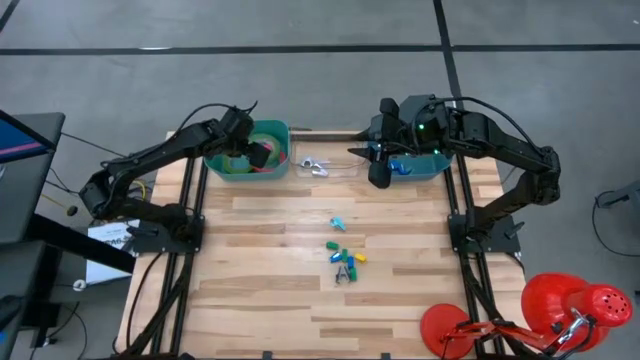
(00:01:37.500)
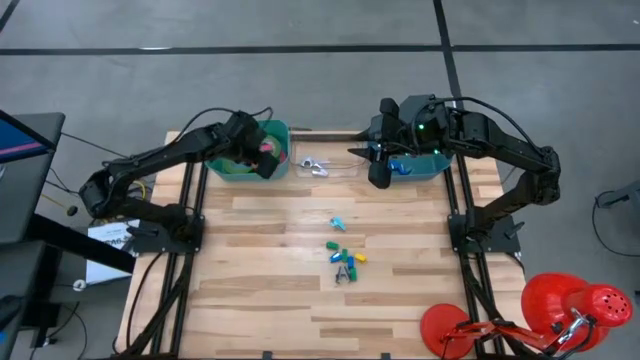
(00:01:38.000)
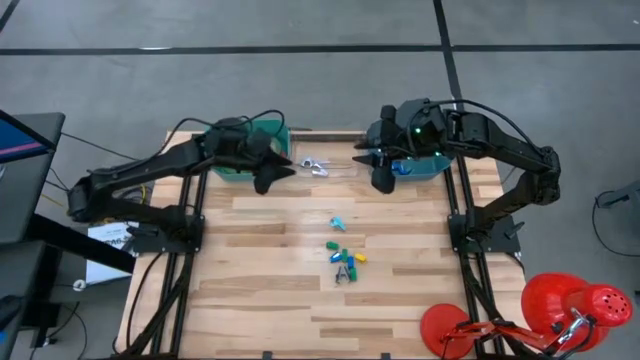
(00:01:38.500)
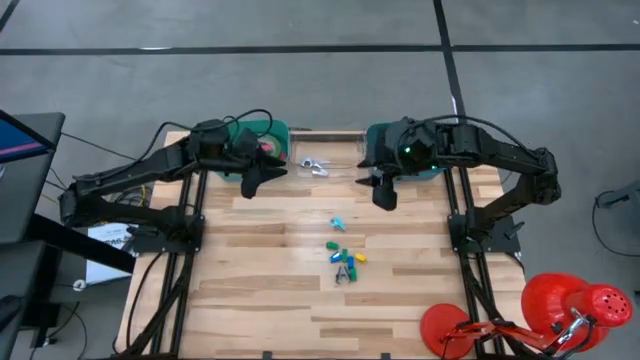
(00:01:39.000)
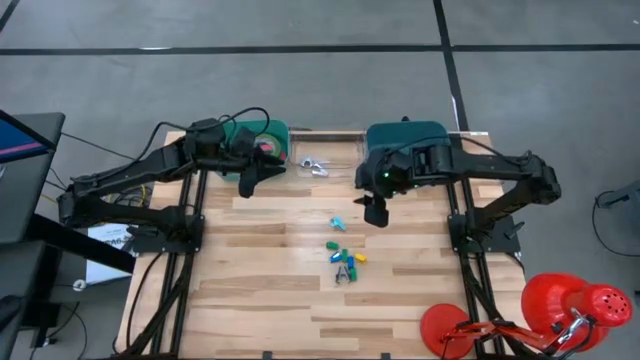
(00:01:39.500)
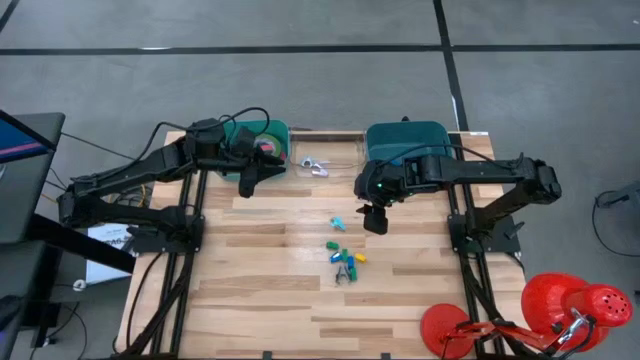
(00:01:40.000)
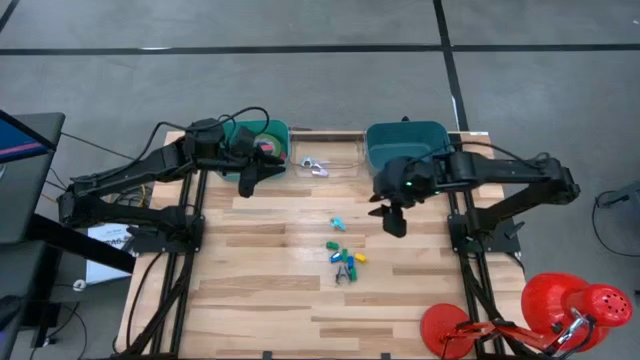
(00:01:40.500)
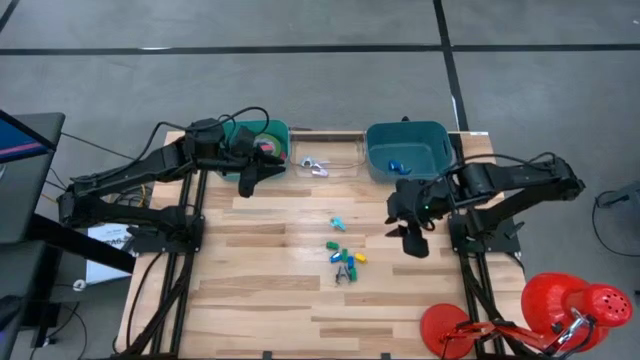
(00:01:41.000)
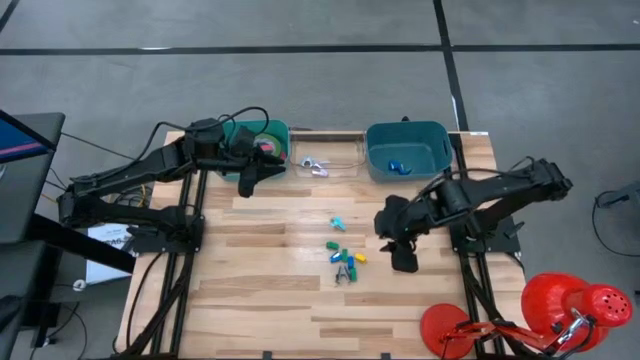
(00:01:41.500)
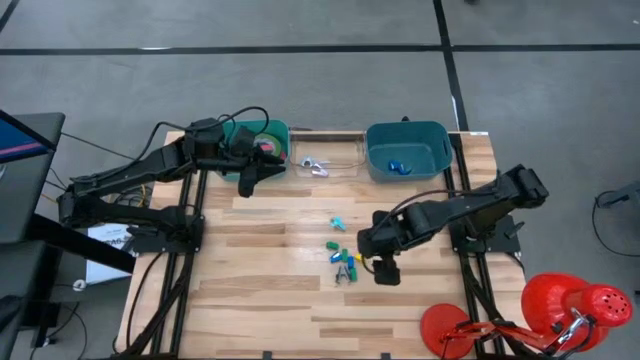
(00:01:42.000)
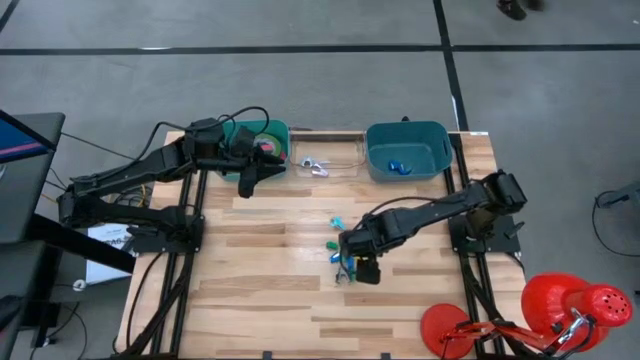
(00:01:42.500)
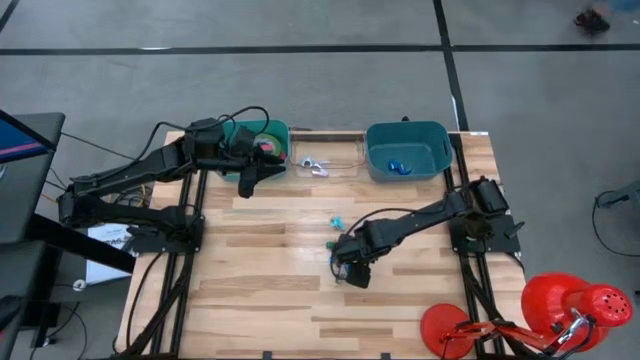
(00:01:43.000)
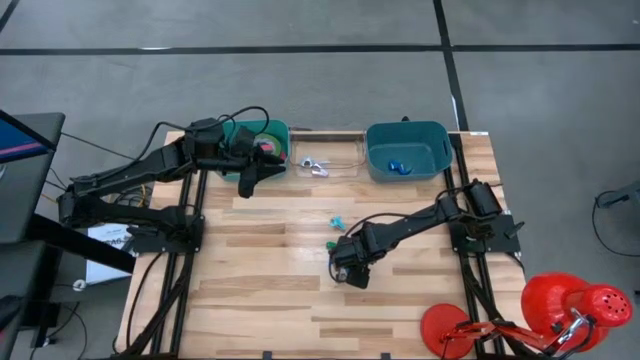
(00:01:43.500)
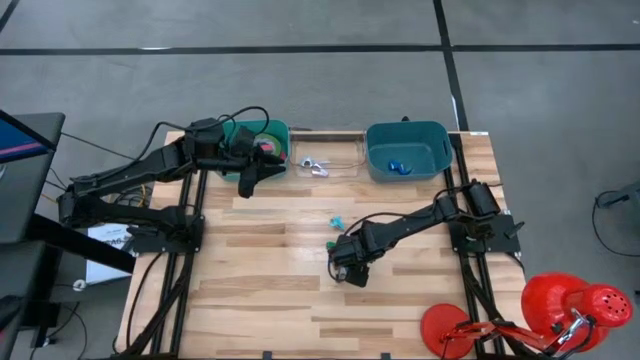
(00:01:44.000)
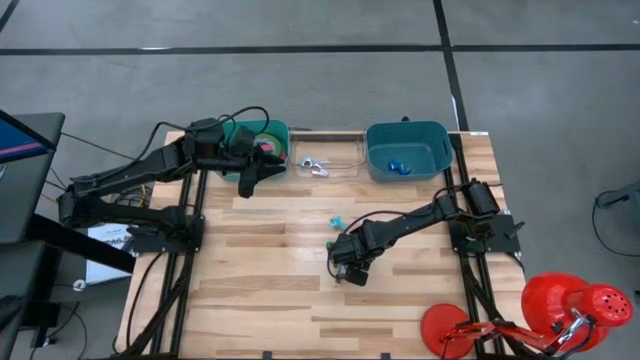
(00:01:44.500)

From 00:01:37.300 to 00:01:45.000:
Task: Pick and place Stapler, Stapler remover, tape
Put the yellow stapler into the dark blue bin

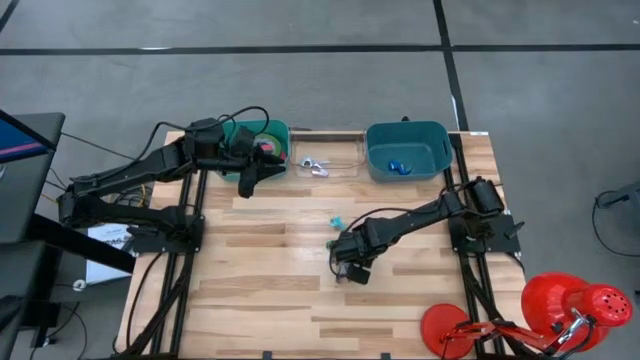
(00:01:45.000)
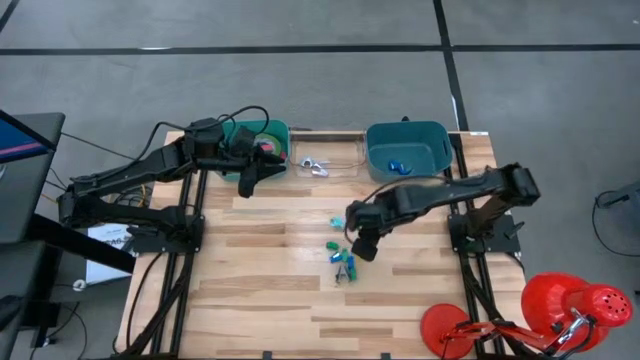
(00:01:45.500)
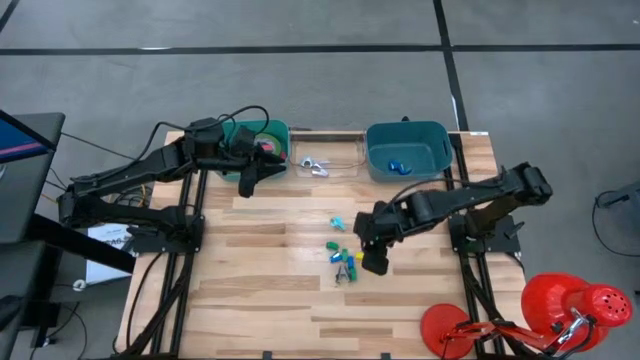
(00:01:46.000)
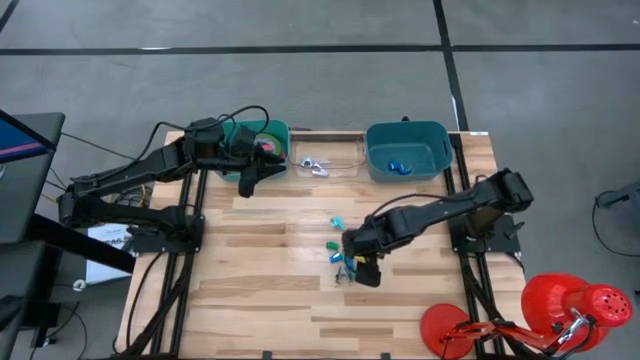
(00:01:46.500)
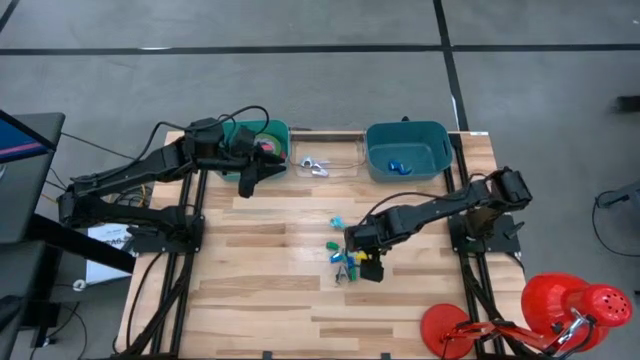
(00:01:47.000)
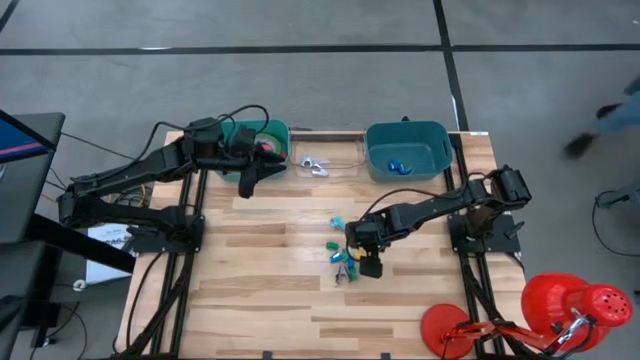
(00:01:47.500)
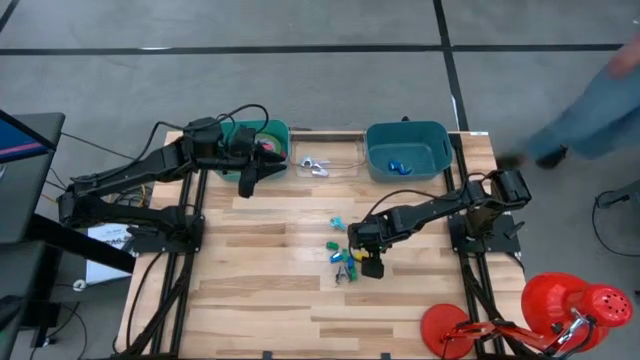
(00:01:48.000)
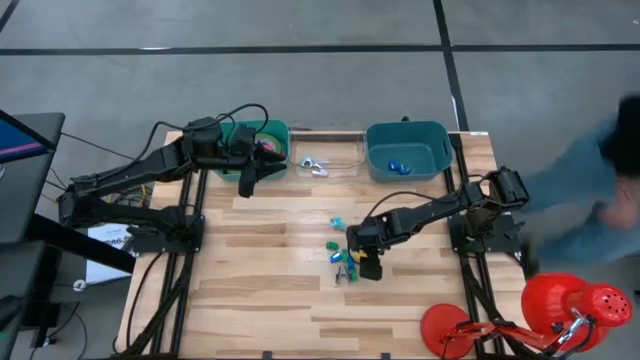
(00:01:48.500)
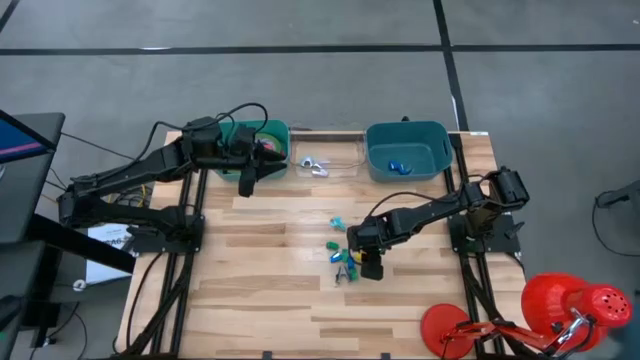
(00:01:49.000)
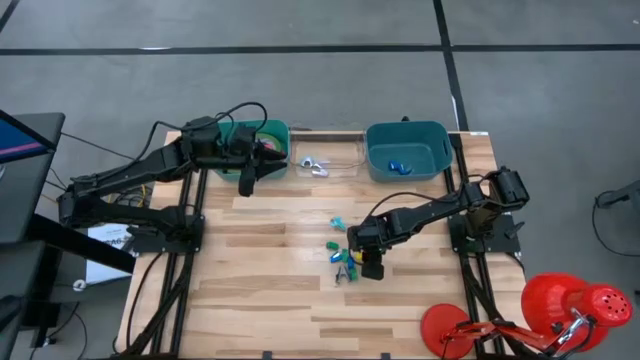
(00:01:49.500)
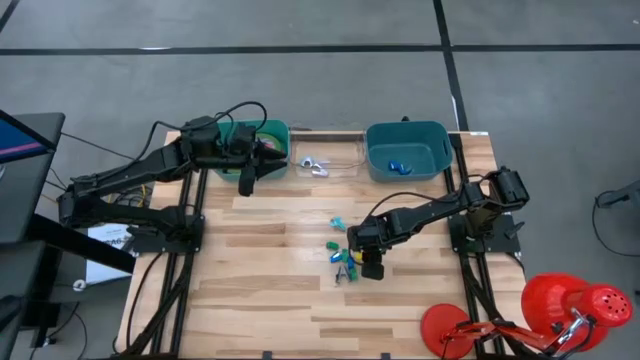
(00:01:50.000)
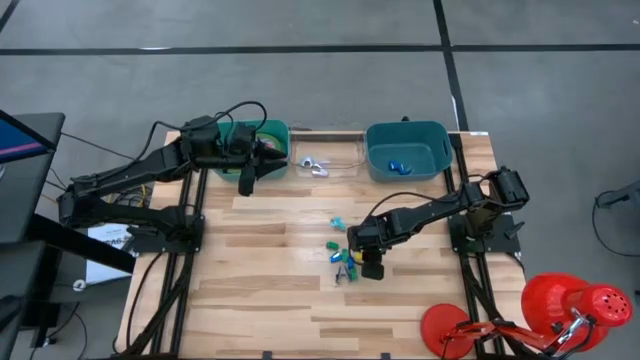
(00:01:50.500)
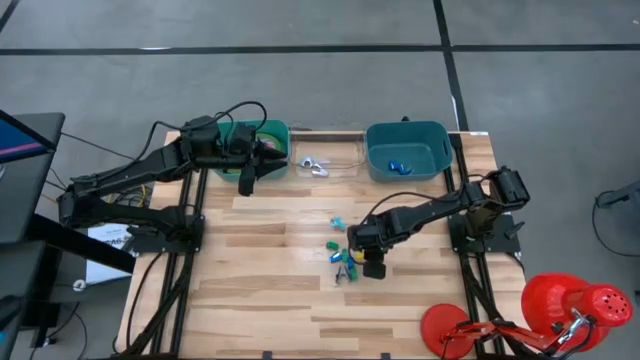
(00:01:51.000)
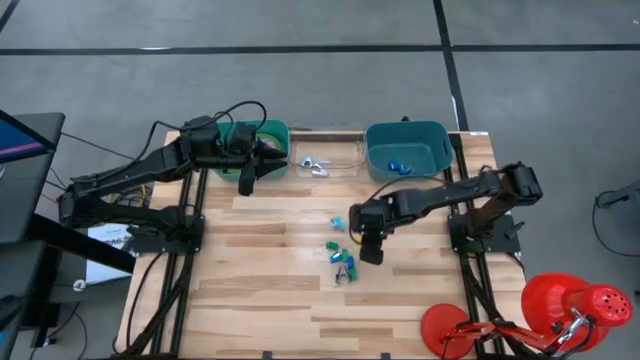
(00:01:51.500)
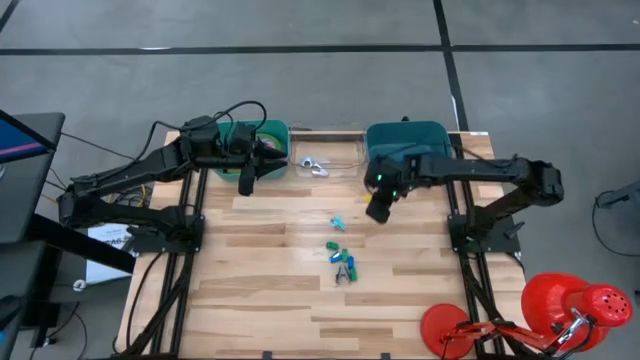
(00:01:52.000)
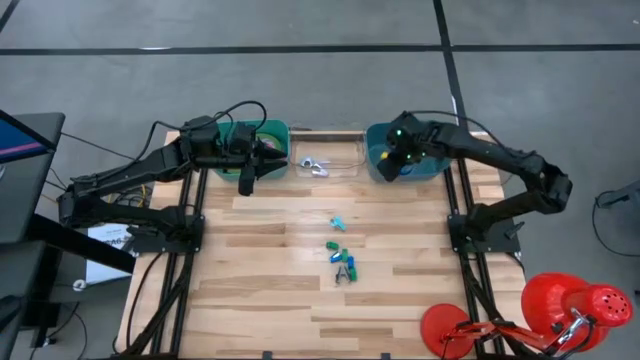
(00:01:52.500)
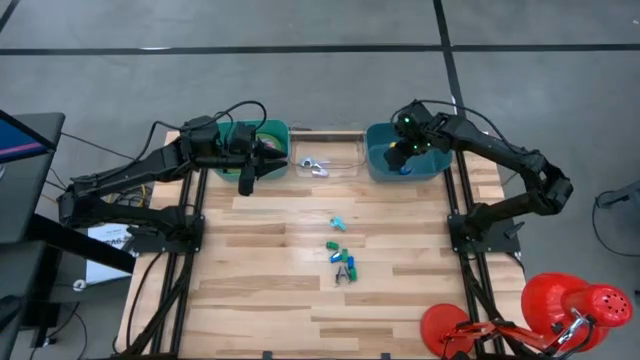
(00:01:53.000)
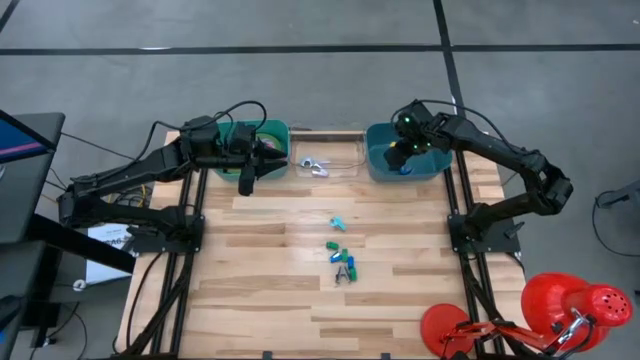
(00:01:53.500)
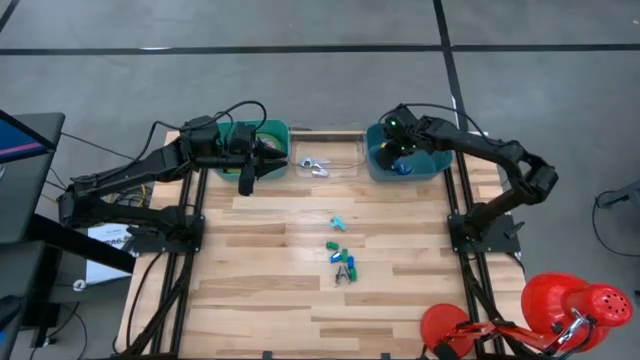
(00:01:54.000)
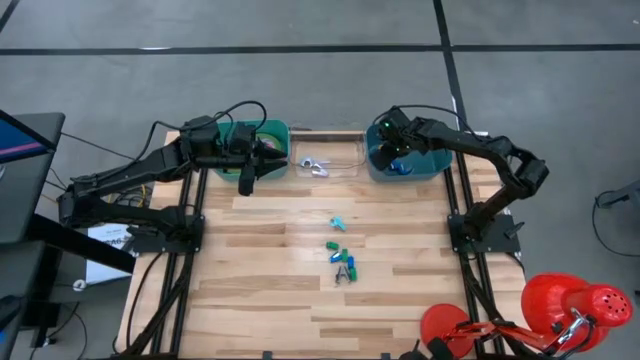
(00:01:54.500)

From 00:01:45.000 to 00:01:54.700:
Put the yellow stapler into the dark blue bin

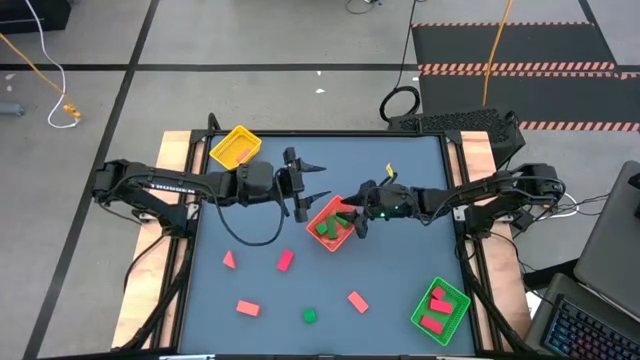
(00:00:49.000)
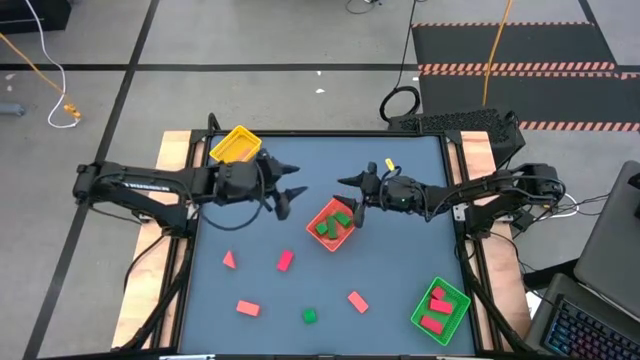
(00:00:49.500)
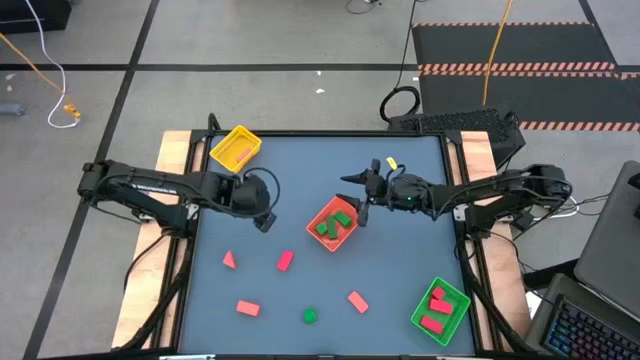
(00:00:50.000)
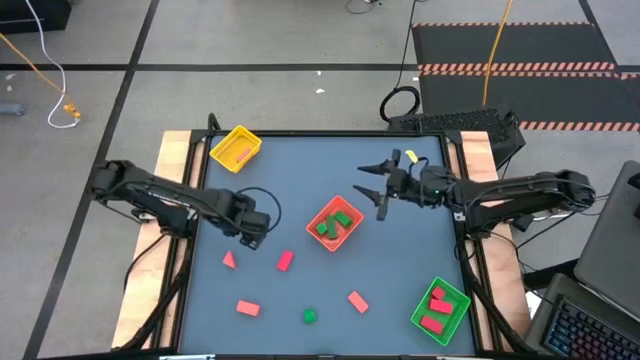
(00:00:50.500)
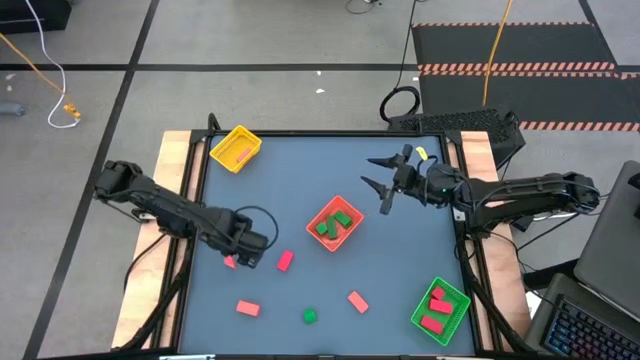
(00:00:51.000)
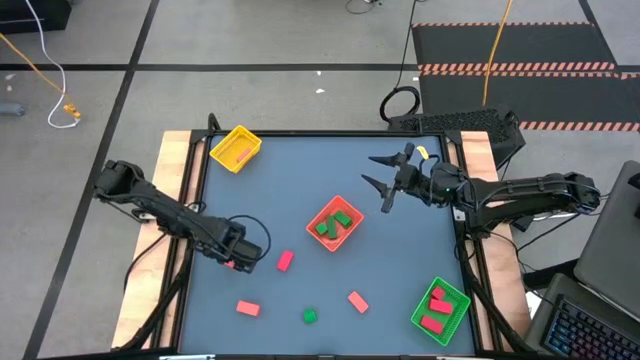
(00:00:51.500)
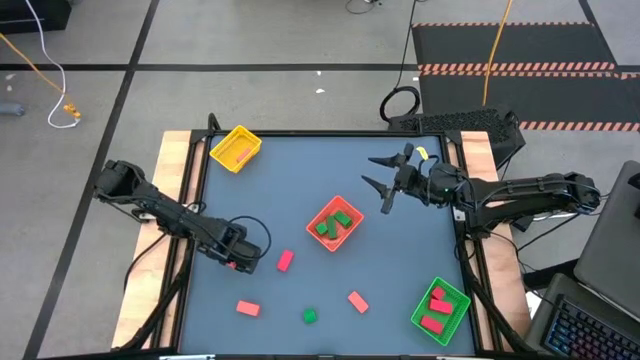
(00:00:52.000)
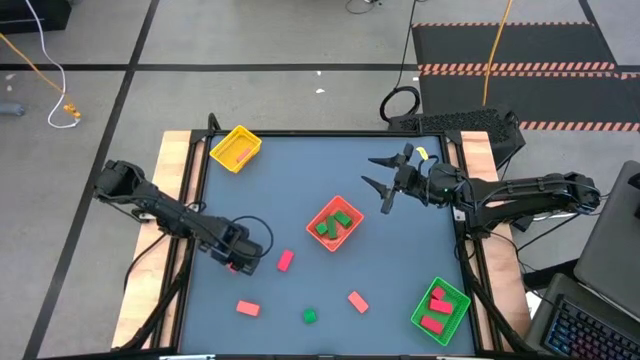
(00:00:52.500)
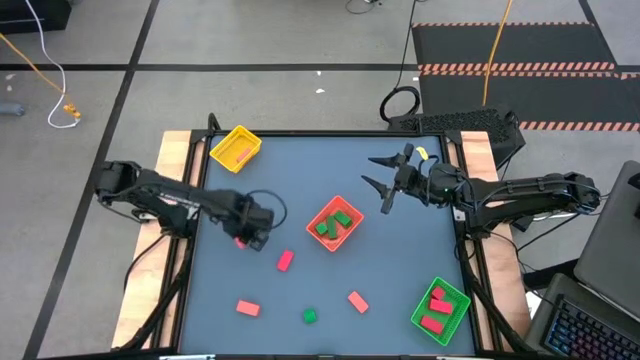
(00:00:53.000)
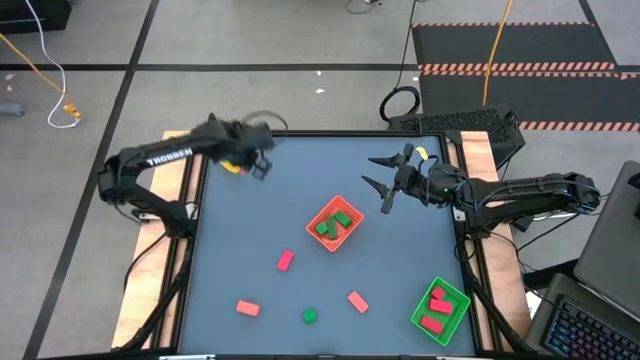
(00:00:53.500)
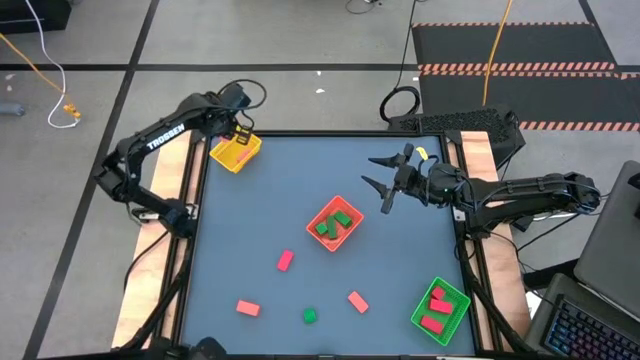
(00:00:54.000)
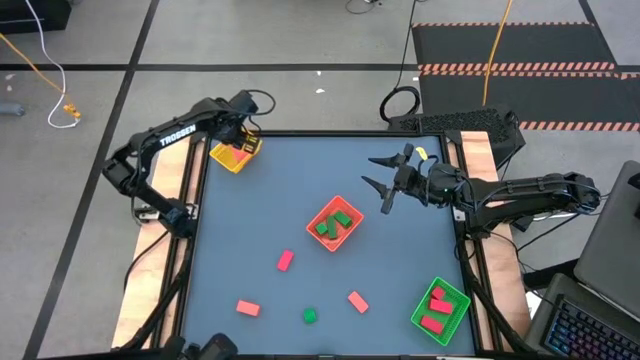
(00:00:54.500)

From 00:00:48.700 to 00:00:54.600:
Task: Sort & place blocks by color
Put the orange block into the yellow bin
